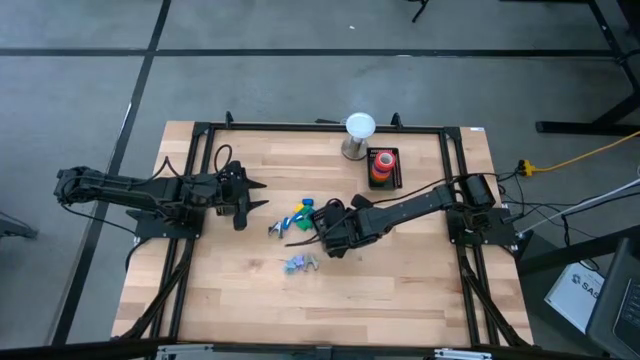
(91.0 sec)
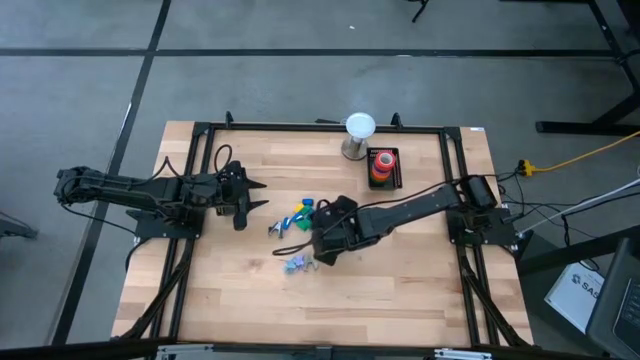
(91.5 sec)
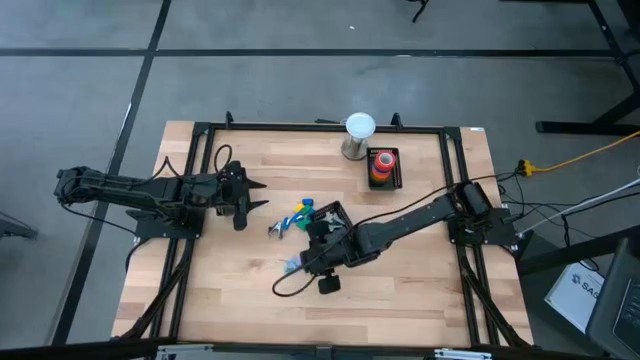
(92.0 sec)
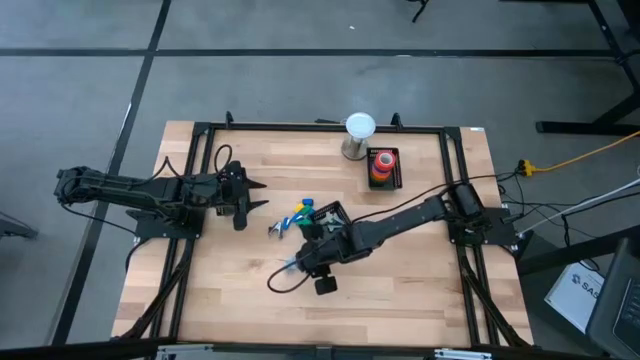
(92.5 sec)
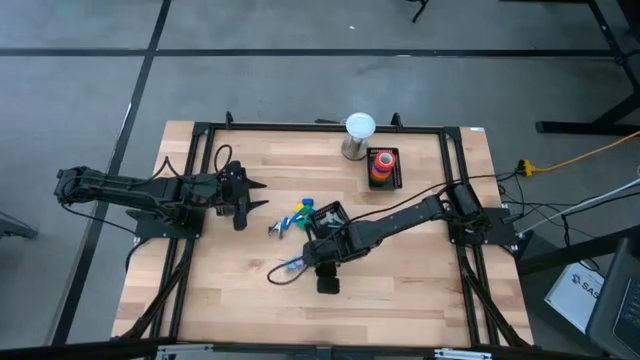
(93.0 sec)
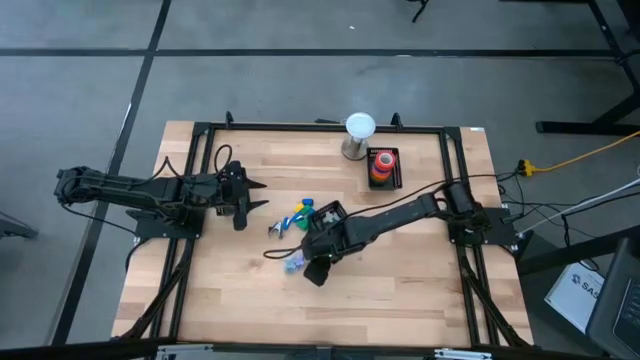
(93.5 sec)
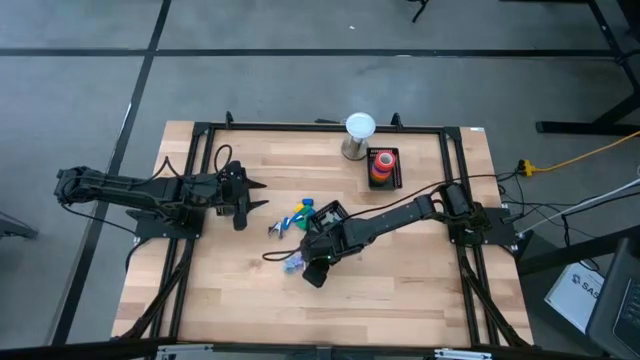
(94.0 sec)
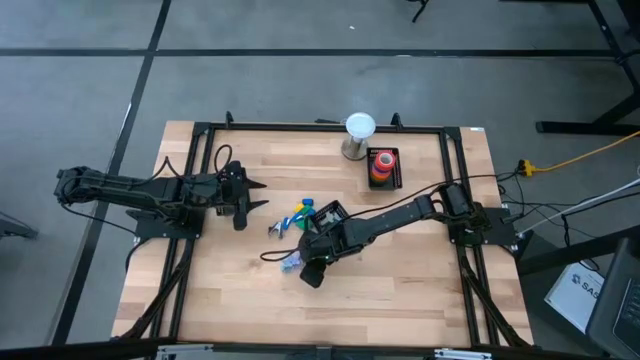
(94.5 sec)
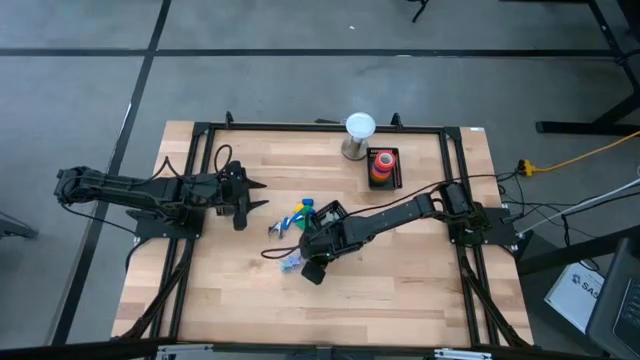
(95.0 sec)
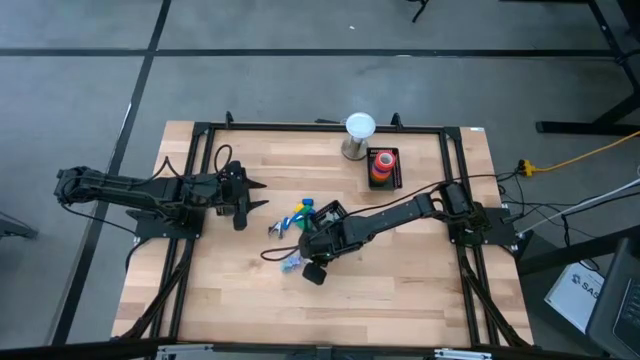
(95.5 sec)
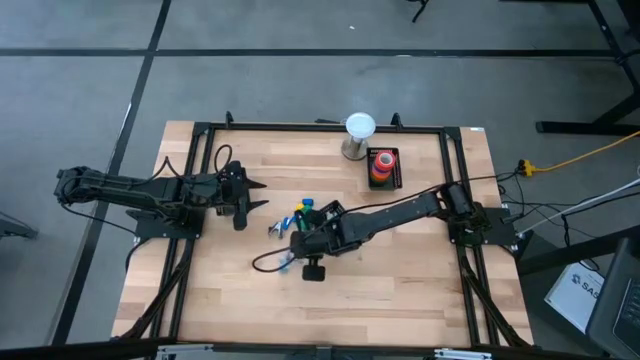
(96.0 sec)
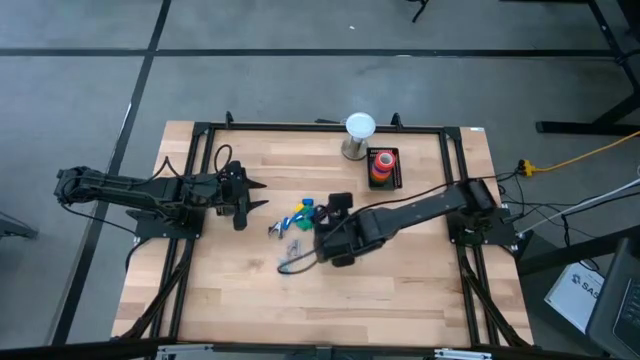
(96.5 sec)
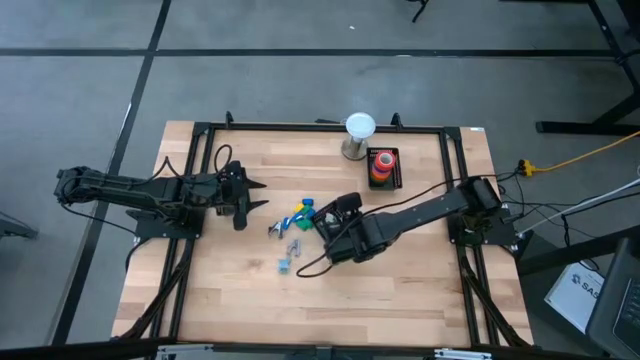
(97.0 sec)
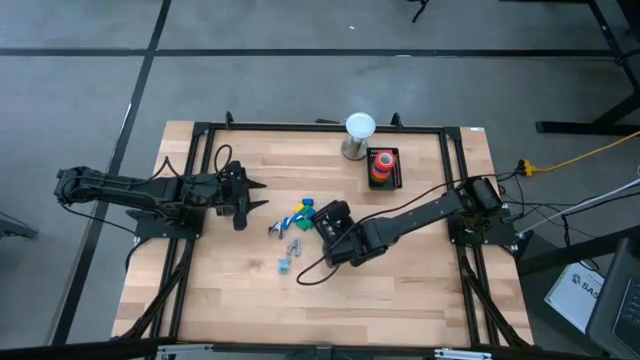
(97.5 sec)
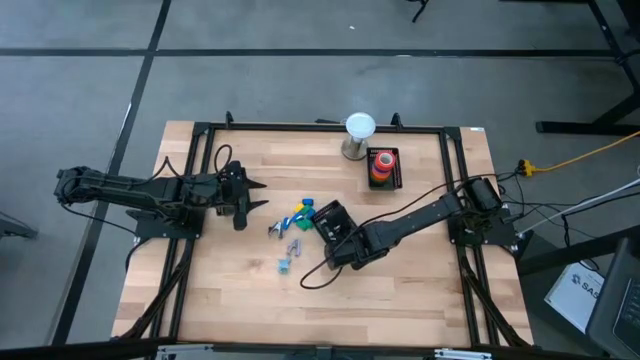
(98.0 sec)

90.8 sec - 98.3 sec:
Task: Pick and place Stapler, Stapler remover, tape
Put the gray staple remover into the center black bin

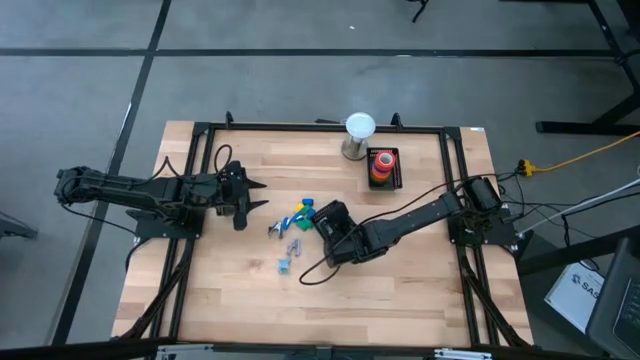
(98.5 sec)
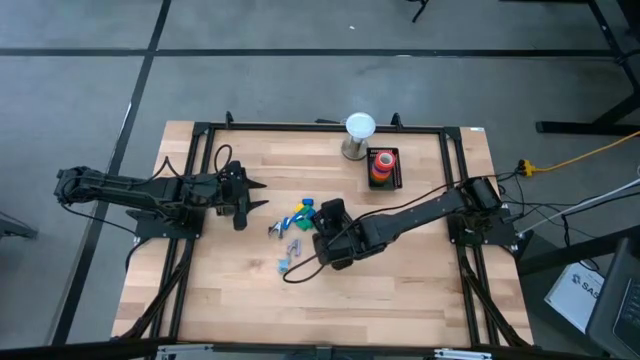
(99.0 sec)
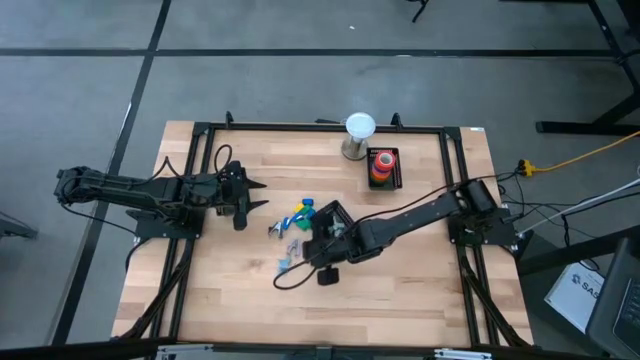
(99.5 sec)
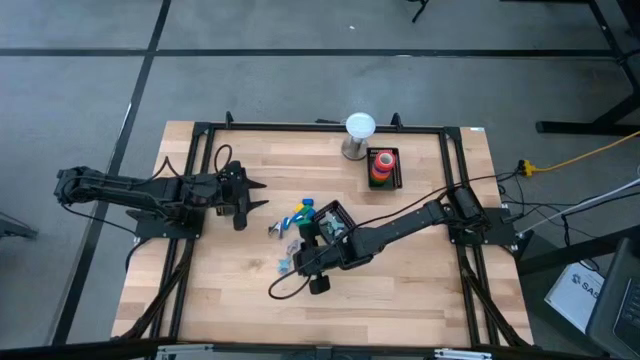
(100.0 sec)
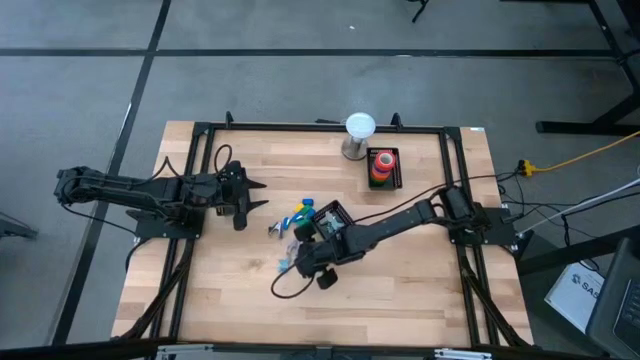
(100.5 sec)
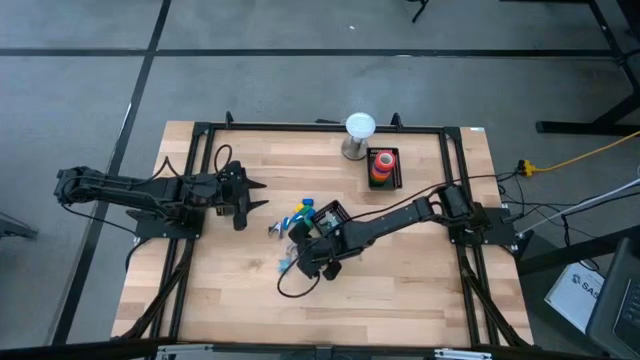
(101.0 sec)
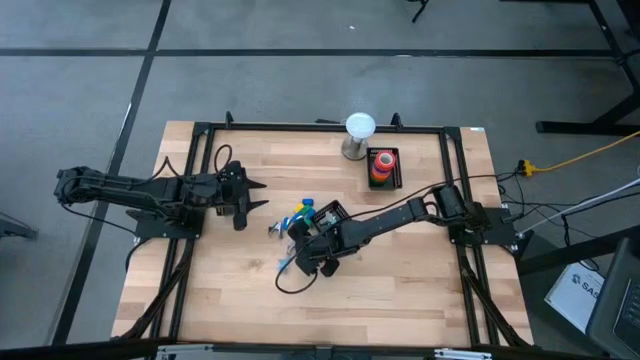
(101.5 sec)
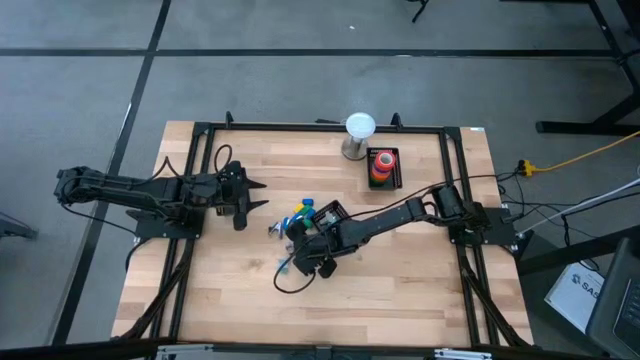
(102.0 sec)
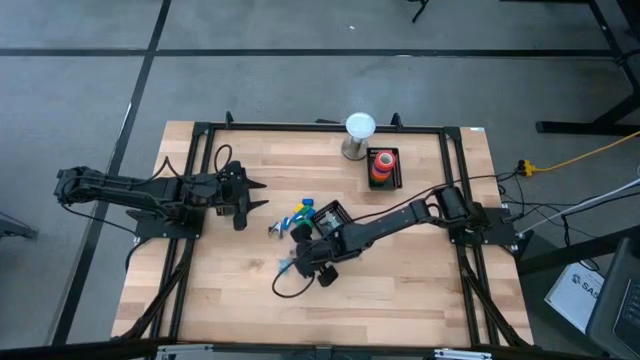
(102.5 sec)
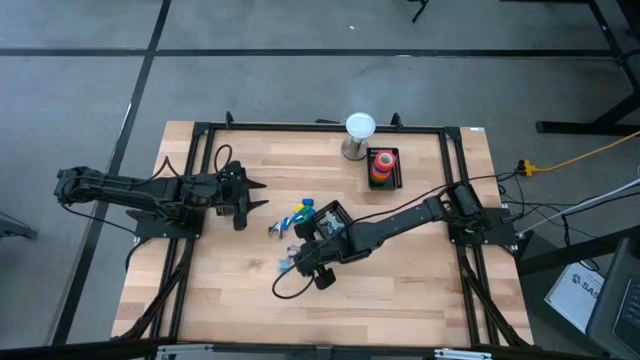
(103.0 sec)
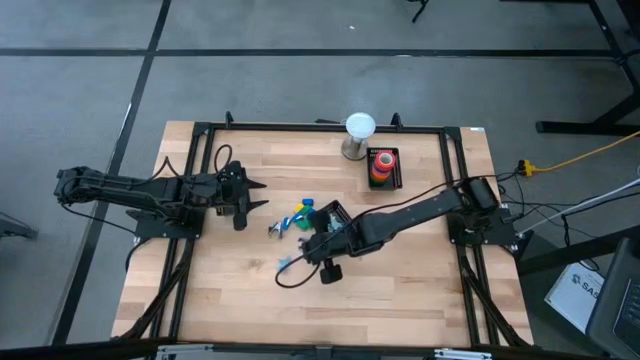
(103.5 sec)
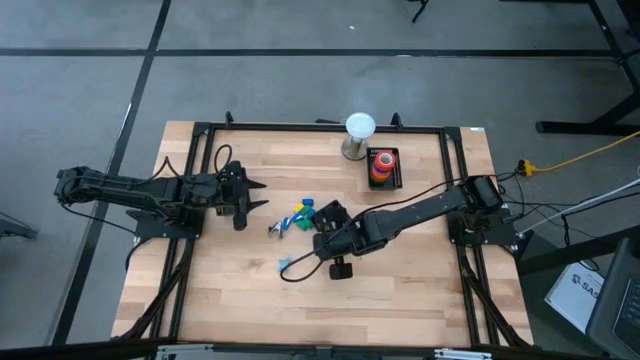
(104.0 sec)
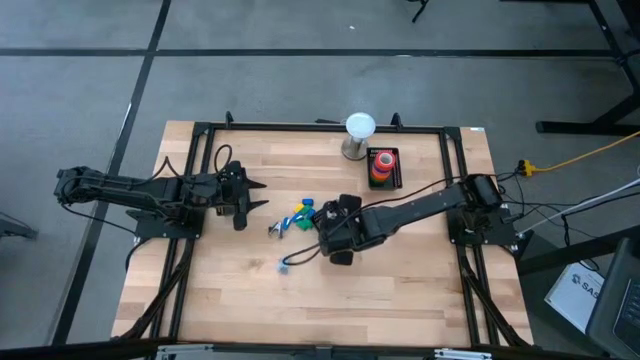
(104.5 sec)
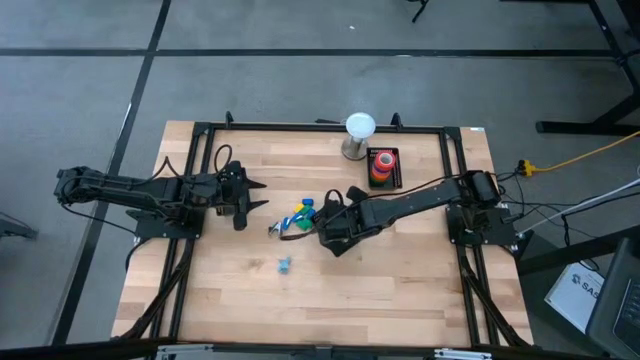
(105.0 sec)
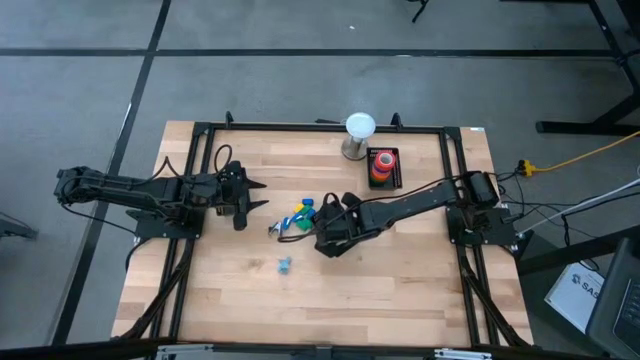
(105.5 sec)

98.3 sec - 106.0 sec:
Put the purple staple remover into the center black bin

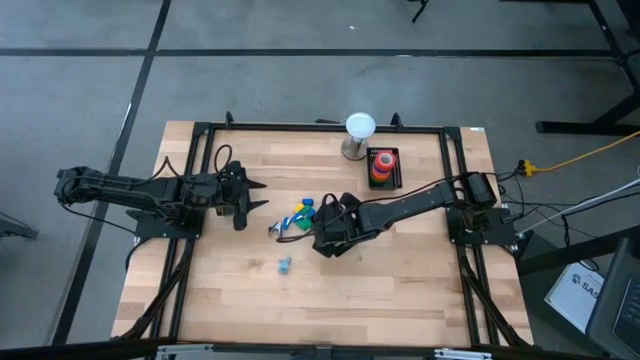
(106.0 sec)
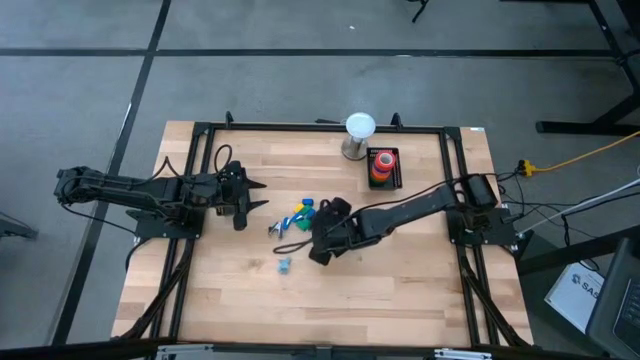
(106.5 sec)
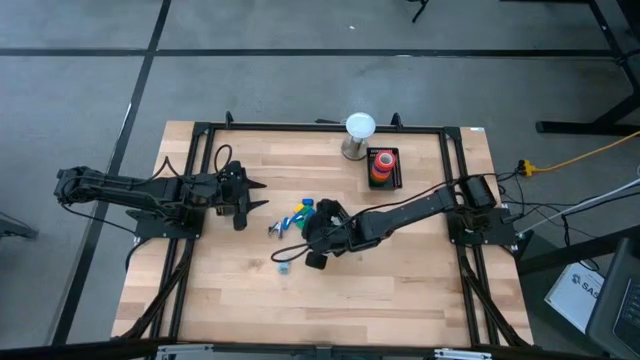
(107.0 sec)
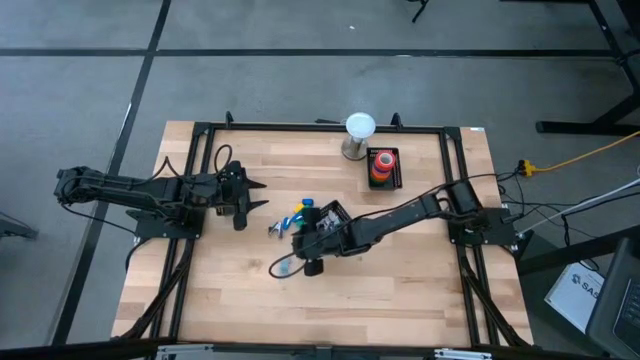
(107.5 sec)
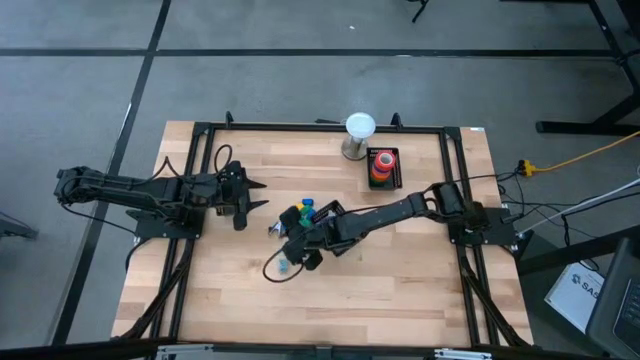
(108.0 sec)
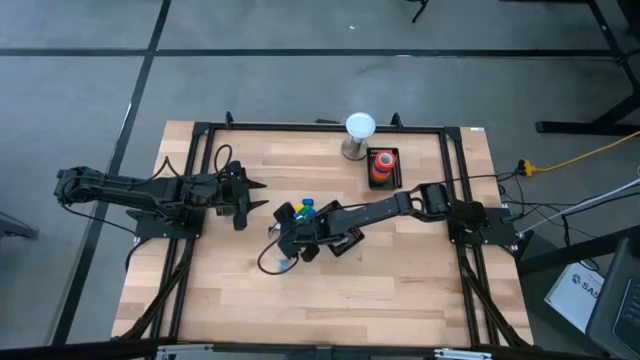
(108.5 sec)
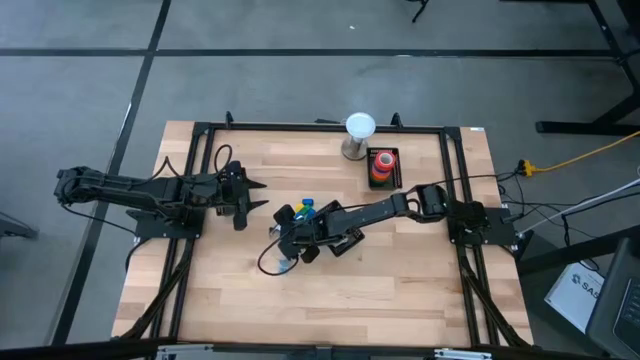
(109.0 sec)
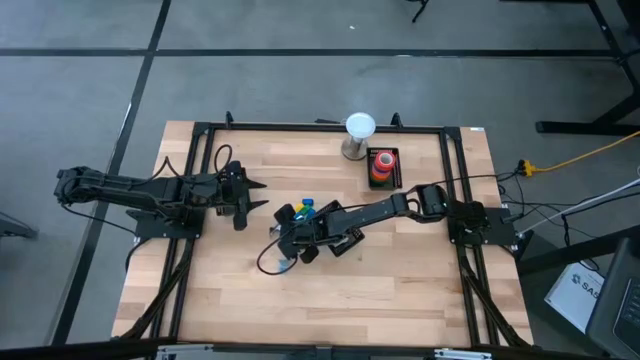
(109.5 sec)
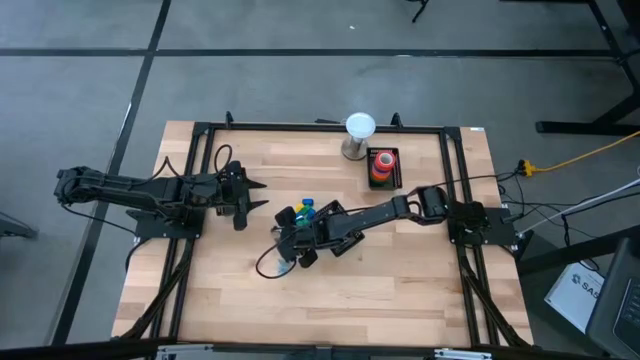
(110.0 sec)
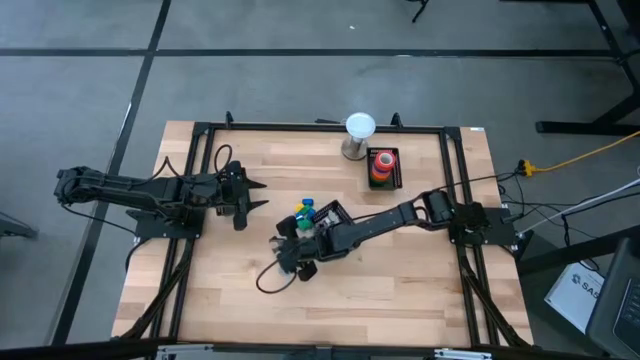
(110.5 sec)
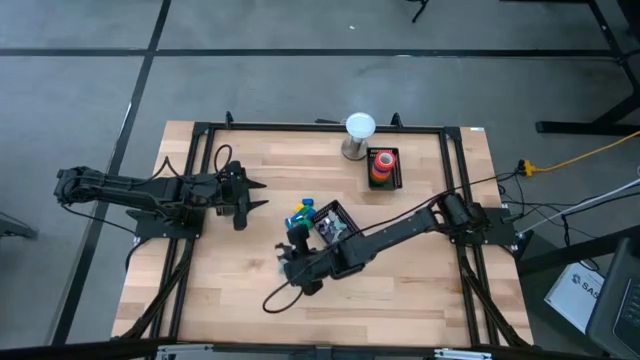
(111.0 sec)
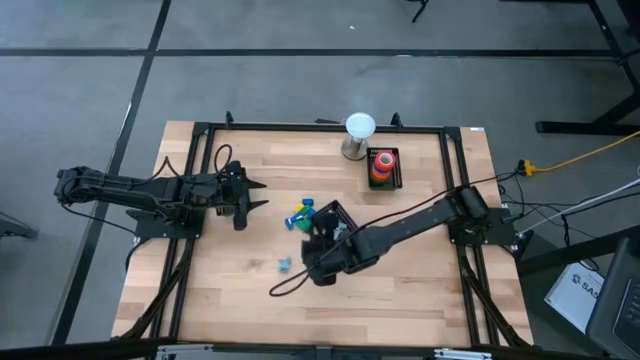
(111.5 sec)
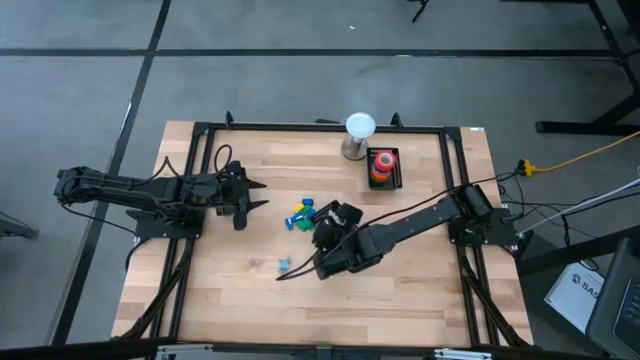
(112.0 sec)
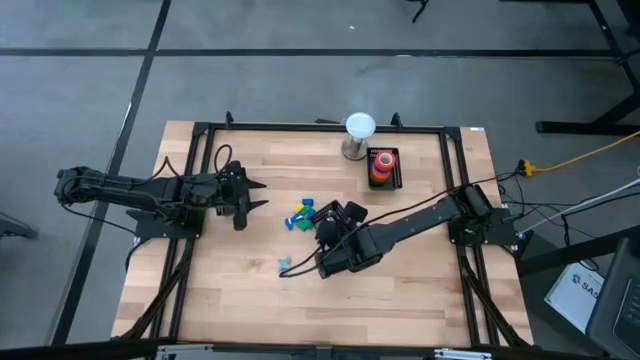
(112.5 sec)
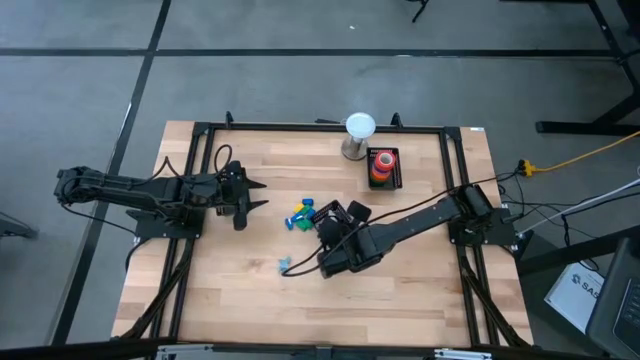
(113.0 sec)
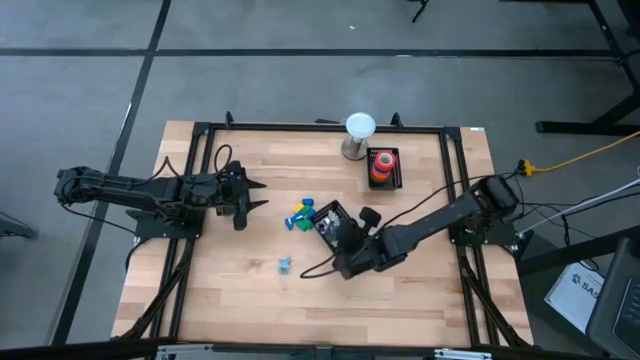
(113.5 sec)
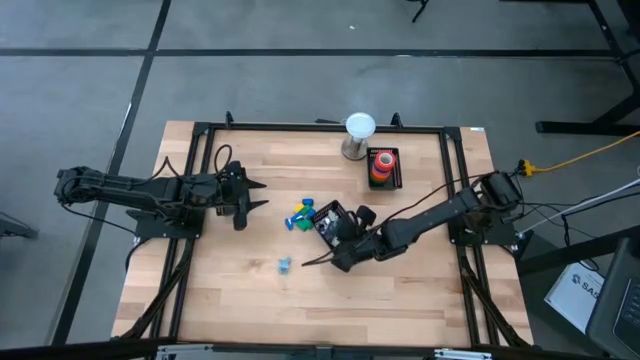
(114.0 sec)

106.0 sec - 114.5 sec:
Put the black staple remover into the center black bin
